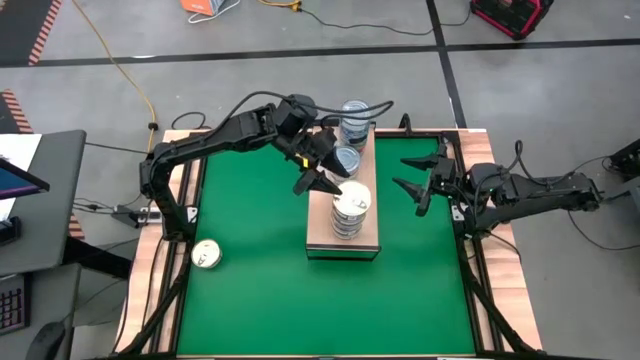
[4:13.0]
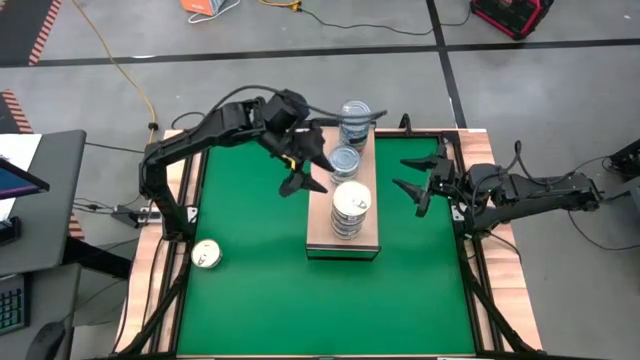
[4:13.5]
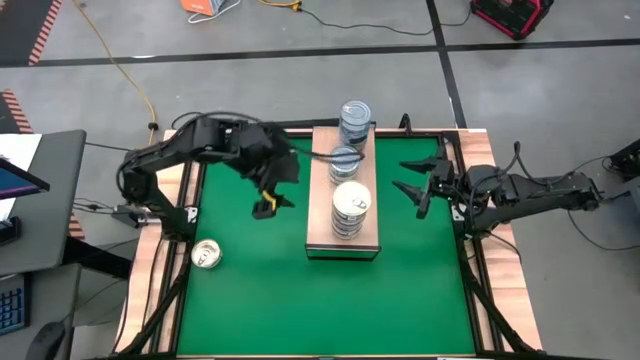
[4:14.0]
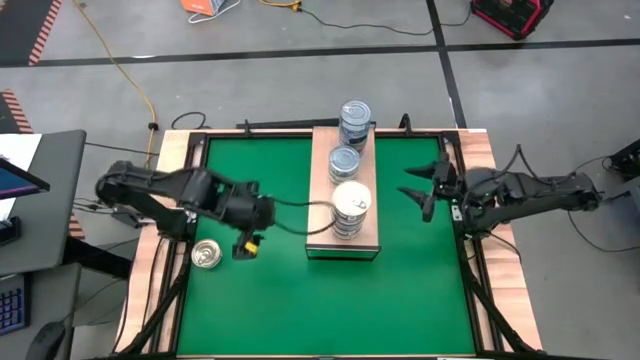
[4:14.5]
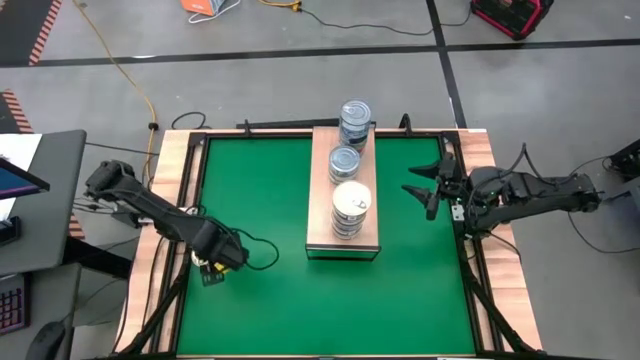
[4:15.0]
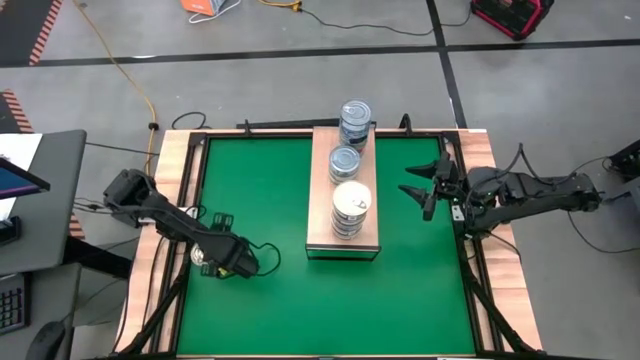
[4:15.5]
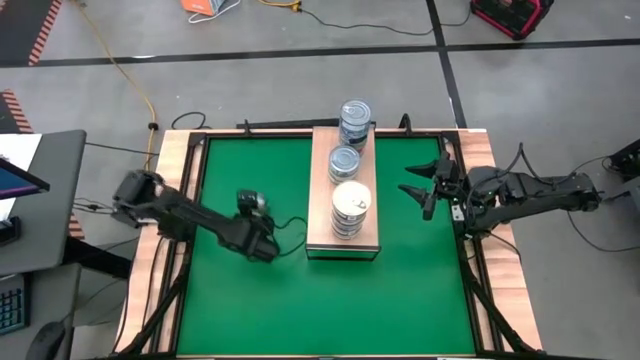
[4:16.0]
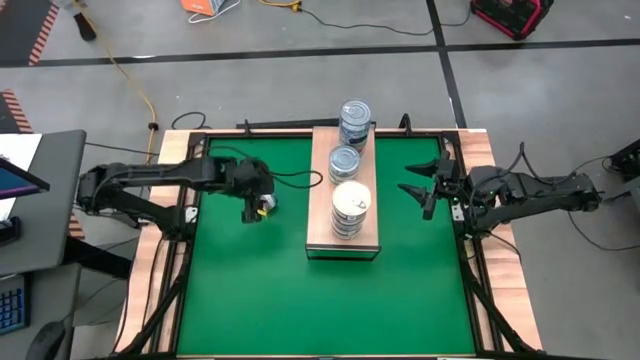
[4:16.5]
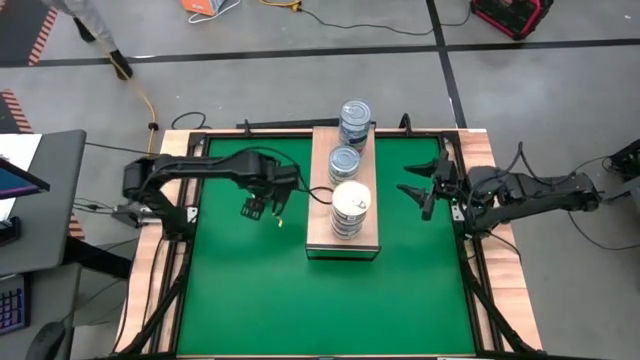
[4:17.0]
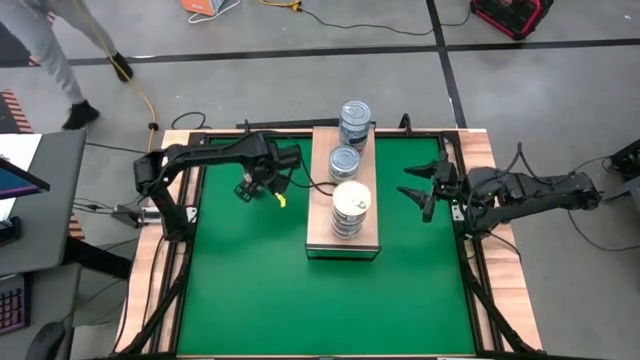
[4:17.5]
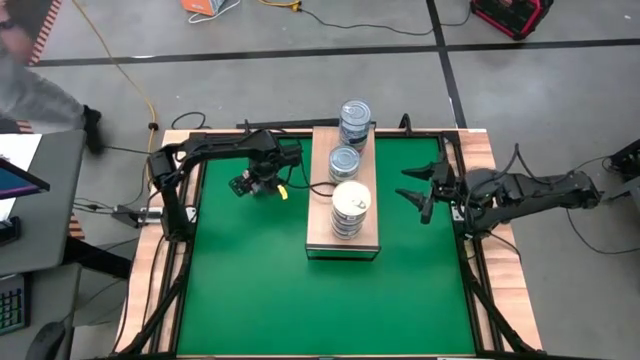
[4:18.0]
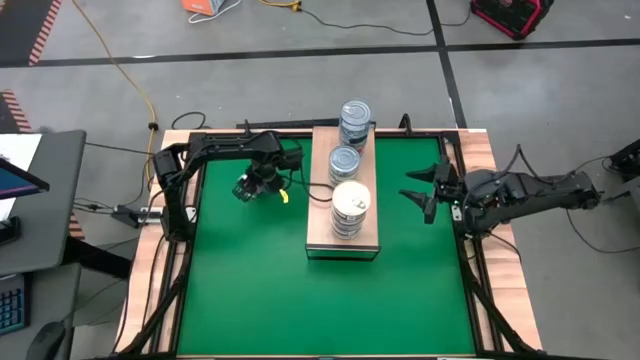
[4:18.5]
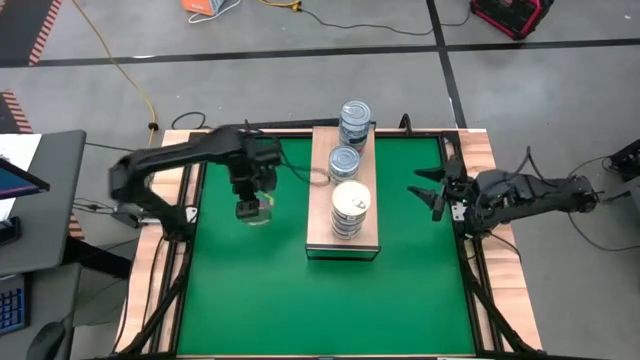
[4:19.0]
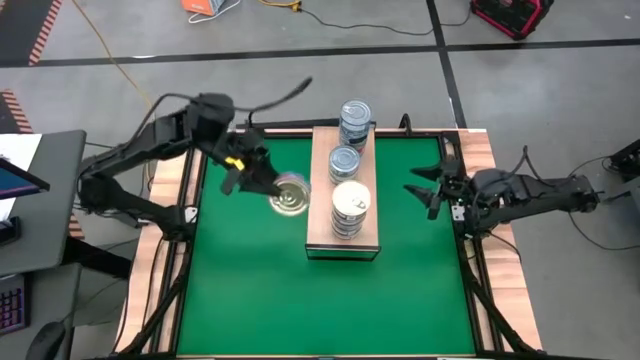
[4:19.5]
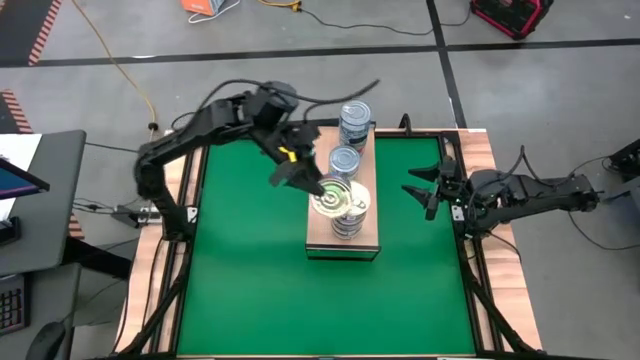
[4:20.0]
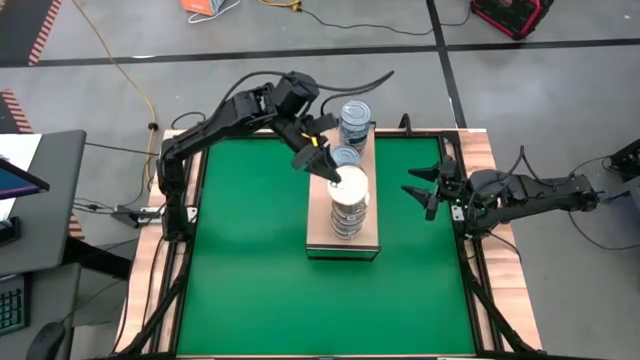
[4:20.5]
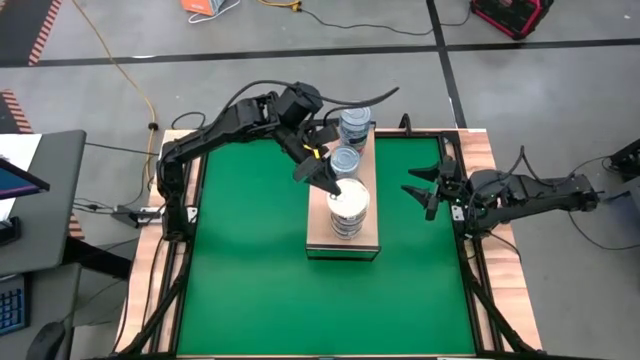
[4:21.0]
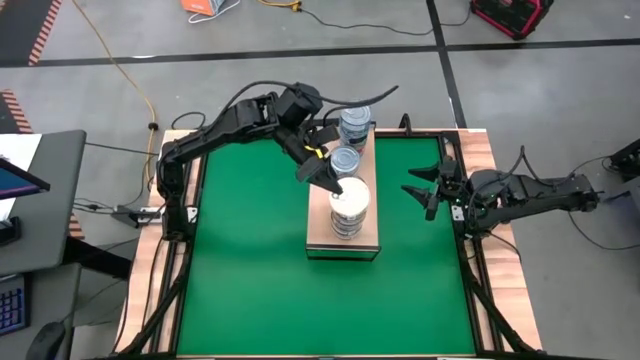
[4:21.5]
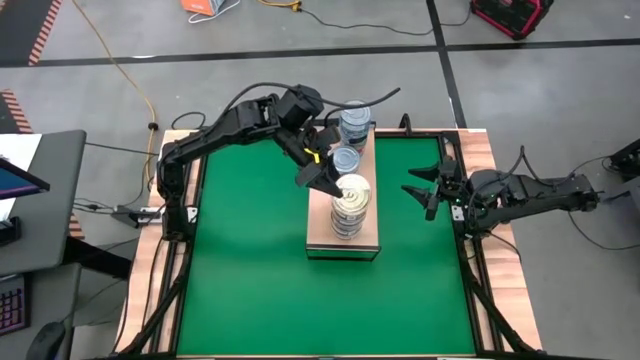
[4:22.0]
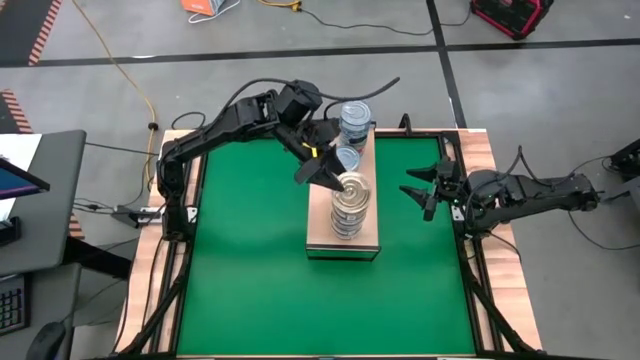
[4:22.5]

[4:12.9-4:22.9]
Task: Stack canned seafood by type on shelf
Stack the blue tuna can on top of the blue tuna can on the shelf

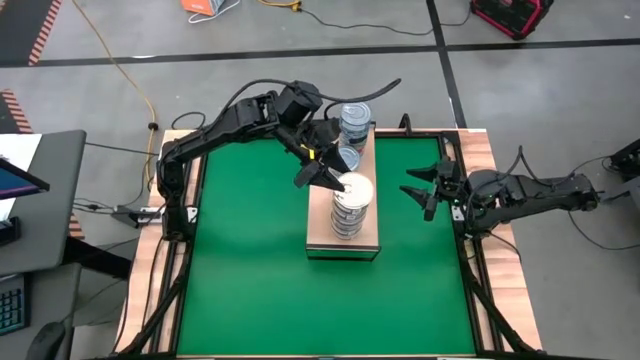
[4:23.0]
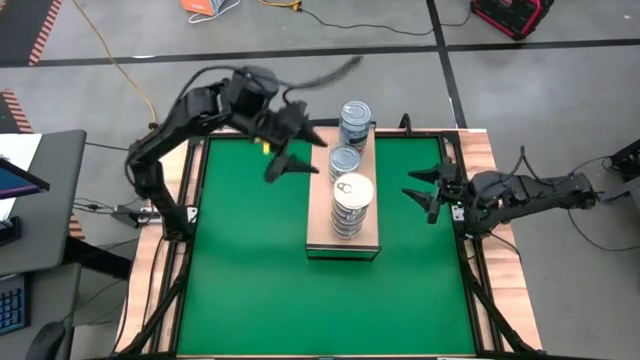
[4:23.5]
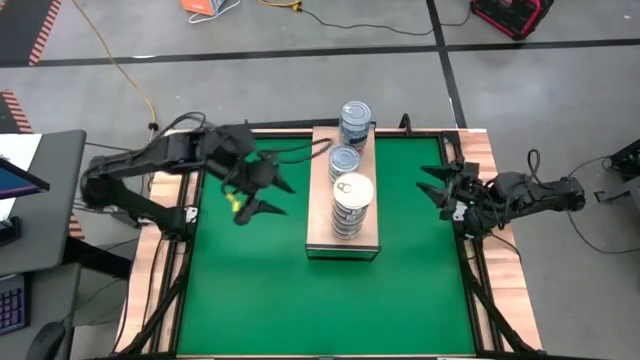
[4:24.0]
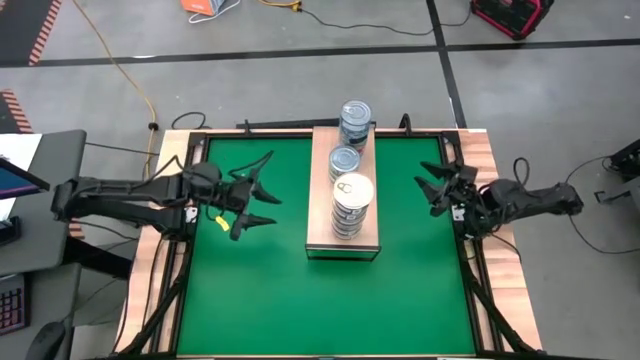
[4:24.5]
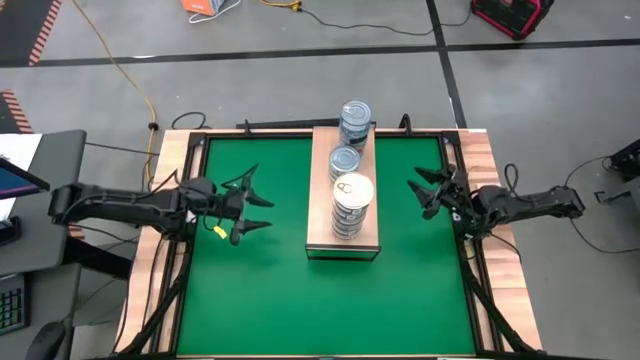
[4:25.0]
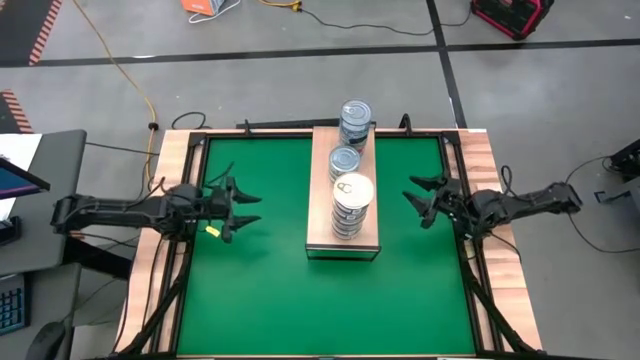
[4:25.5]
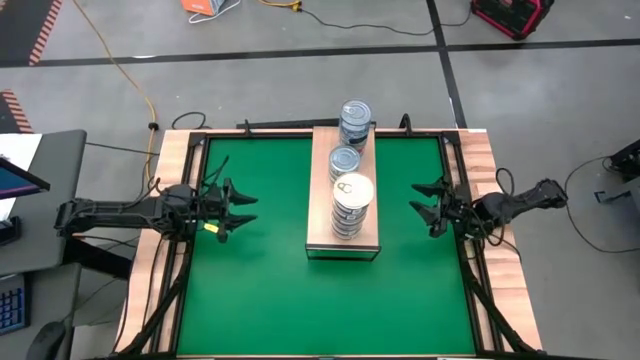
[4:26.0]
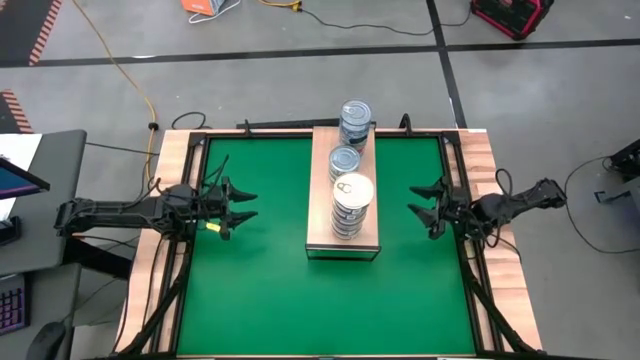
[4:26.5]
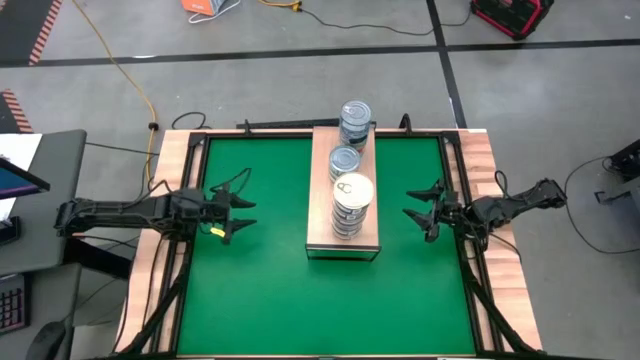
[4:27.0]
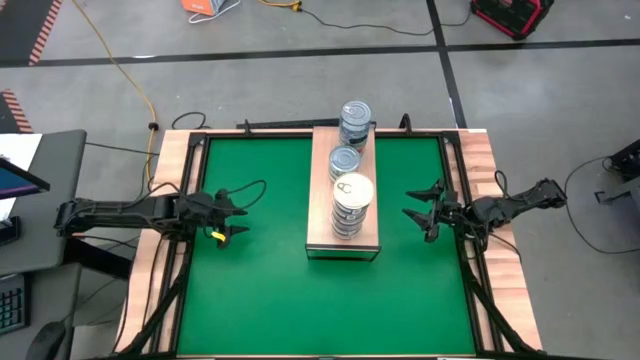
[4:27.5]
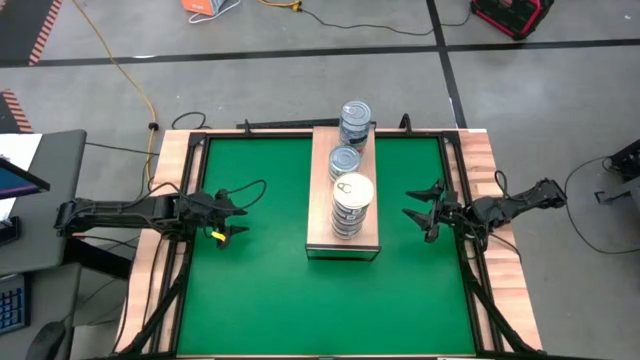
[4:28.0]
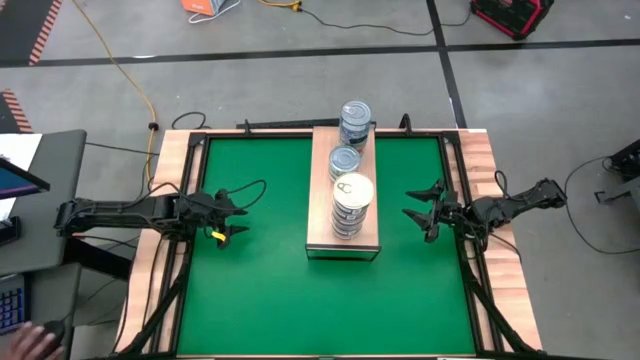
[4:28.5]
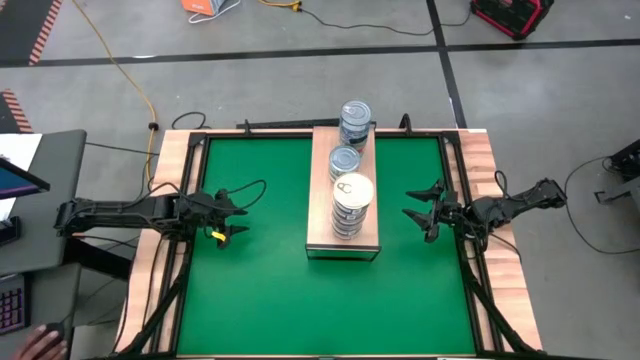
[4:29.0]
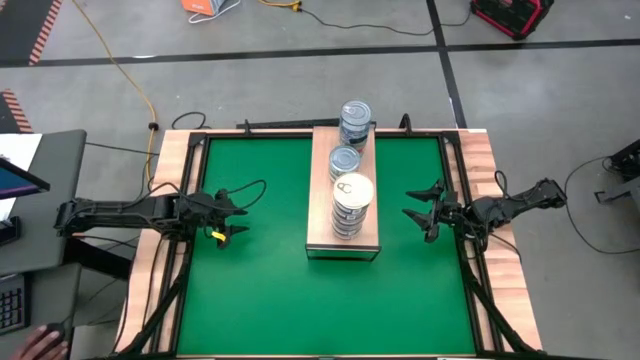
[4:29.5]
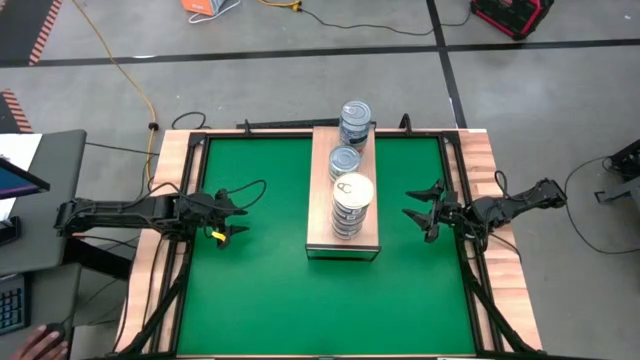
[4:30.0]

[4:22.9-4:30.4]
Return to Home Position

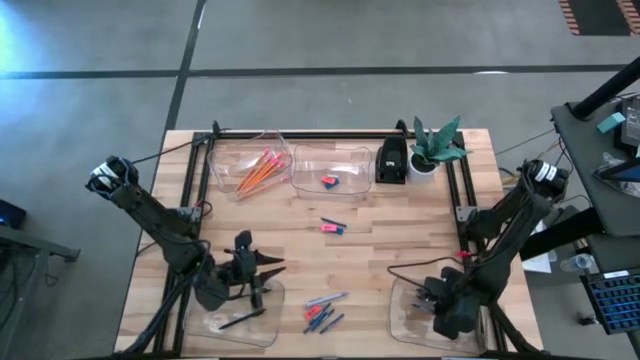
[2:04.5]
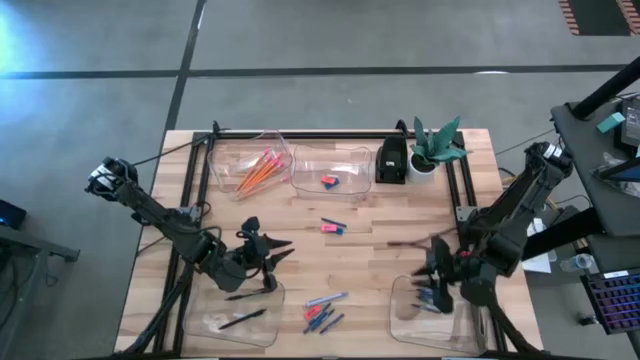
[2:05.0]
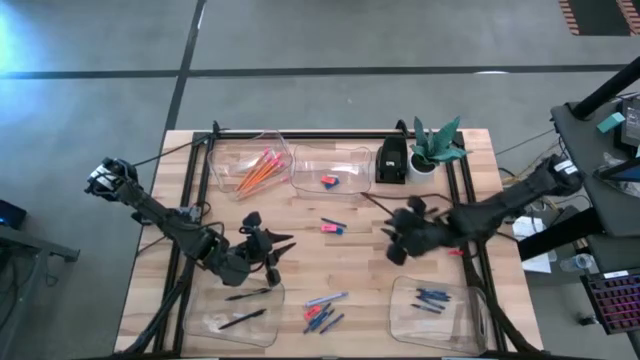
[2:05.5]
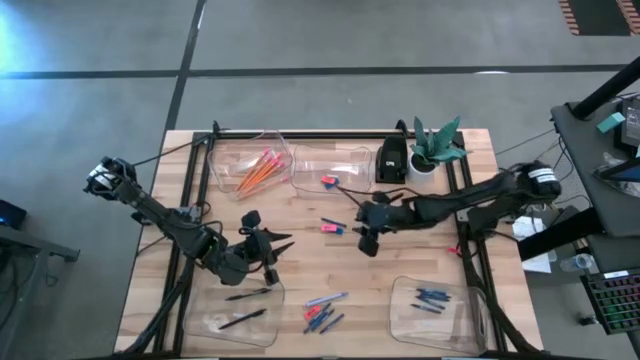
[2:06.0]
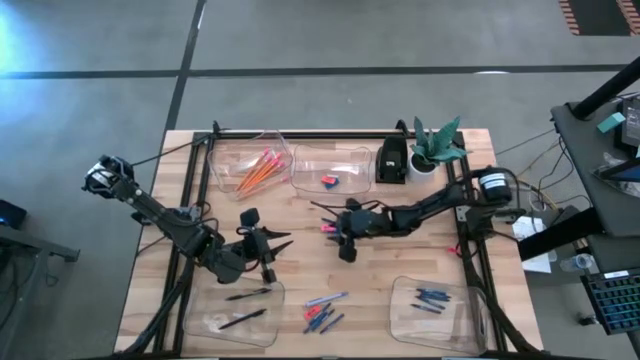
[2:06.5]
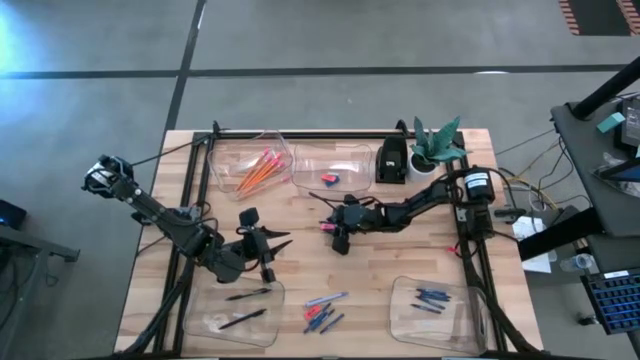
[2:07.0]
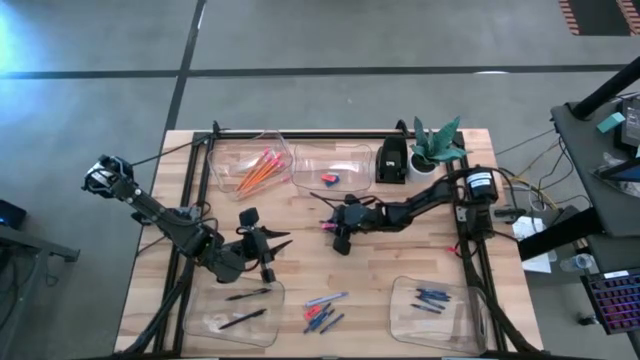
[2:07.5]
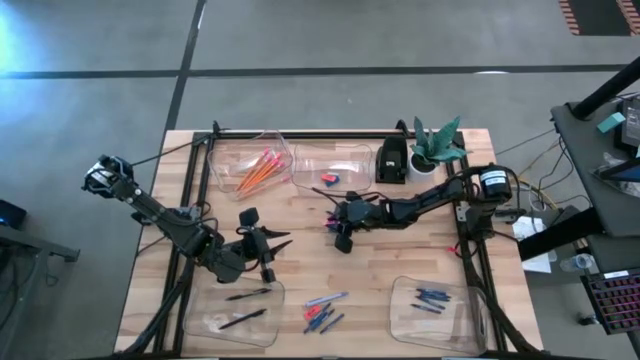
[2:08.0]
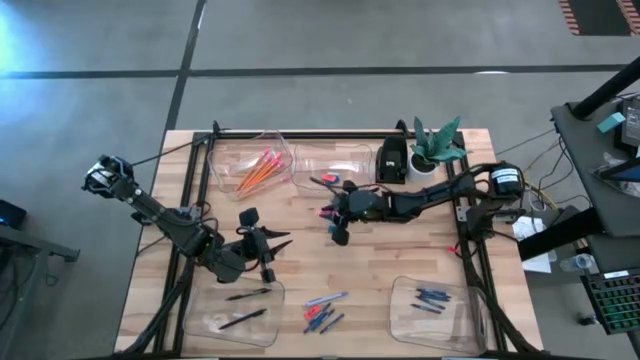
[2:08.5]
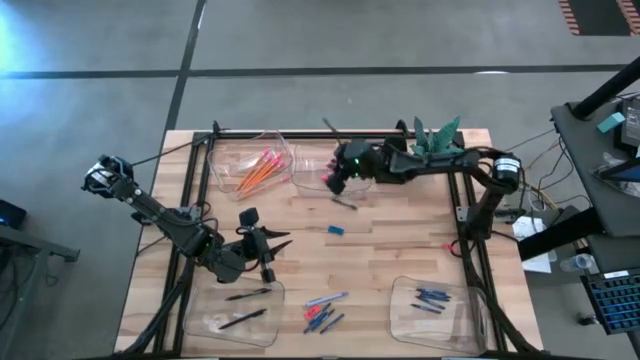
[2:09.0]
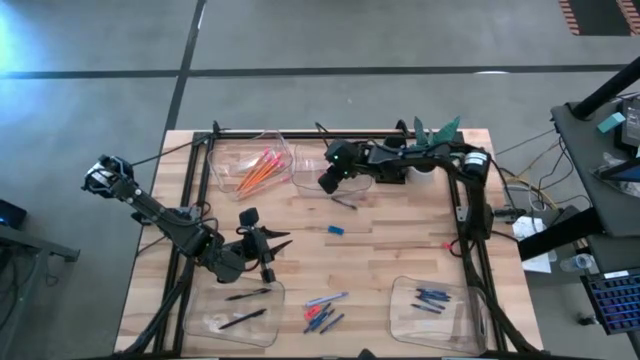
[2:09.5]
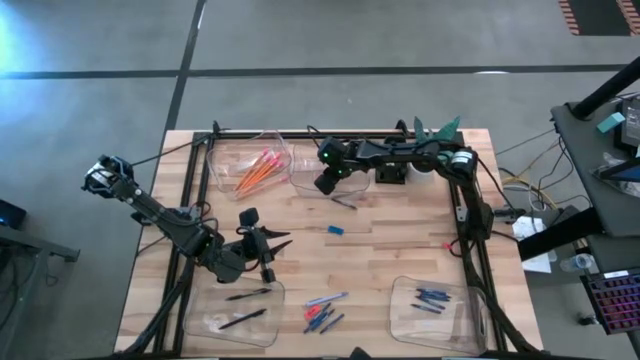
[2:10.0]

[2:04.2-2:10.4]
Task: Sort crayons/erasers/pens/pencils in bins
Put the pink eraser into the top right transparent bin
